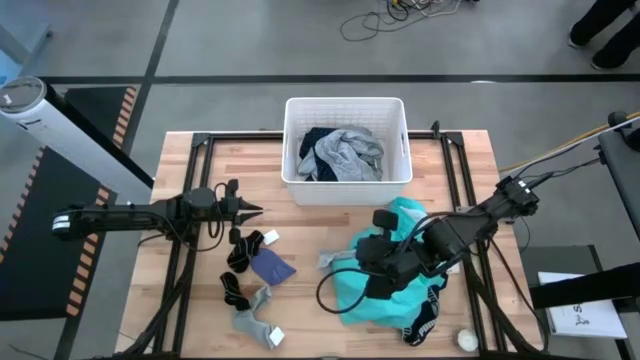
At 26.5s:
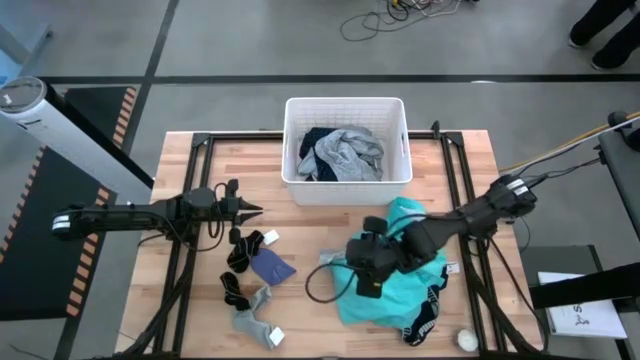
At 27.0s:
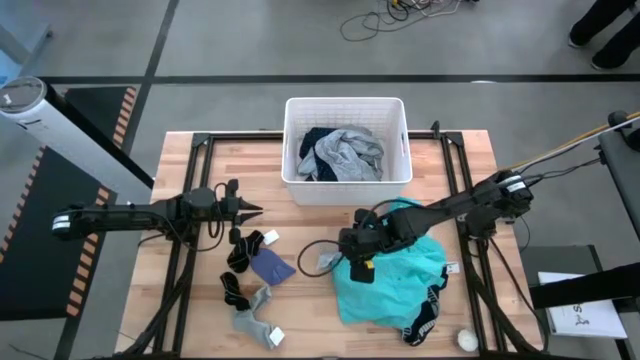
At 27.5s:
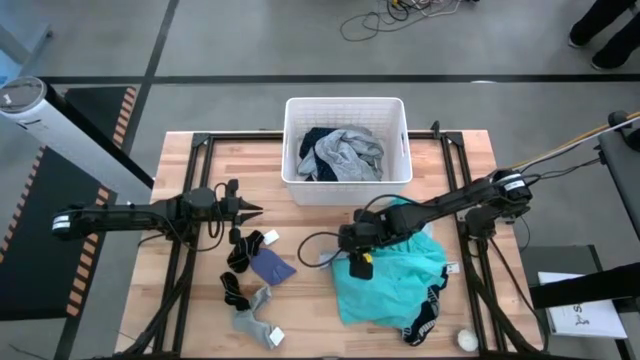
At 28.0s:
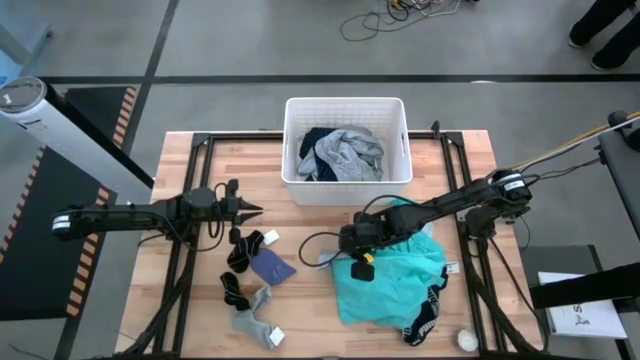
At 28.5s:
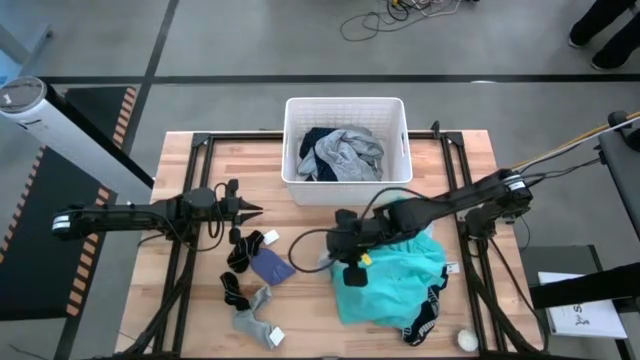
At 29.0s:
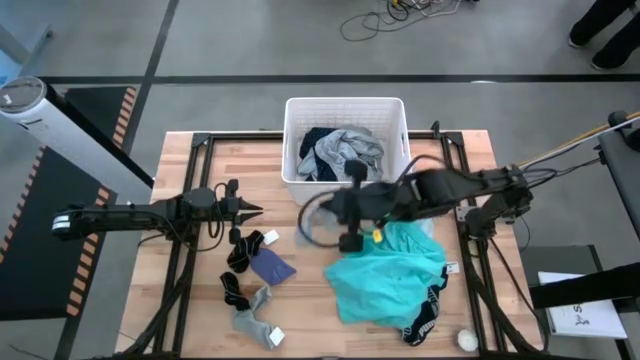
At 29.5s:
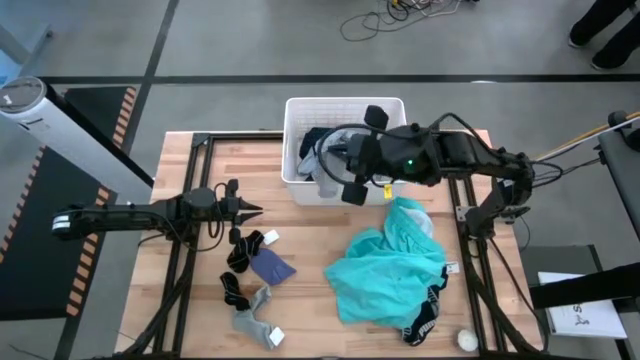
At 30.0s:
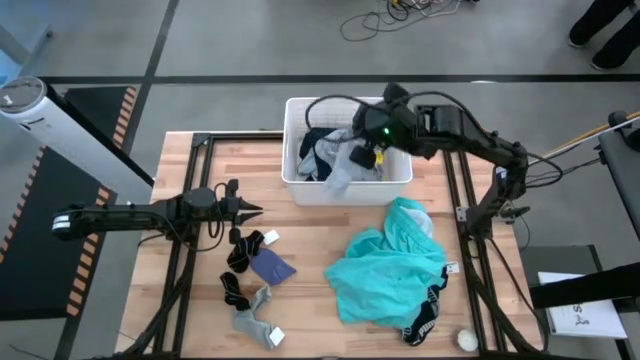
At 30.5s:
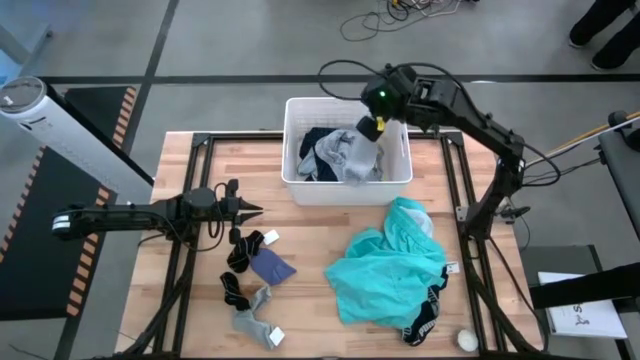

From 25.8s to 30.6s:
Task: Sort clothes
Put the right gray sock into the white laundry bin

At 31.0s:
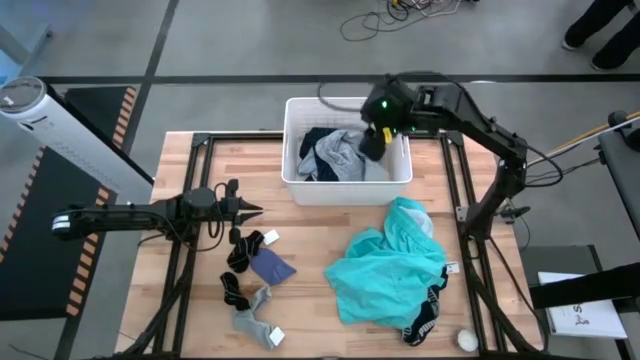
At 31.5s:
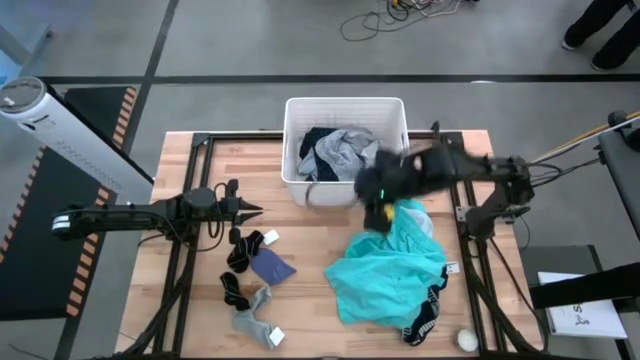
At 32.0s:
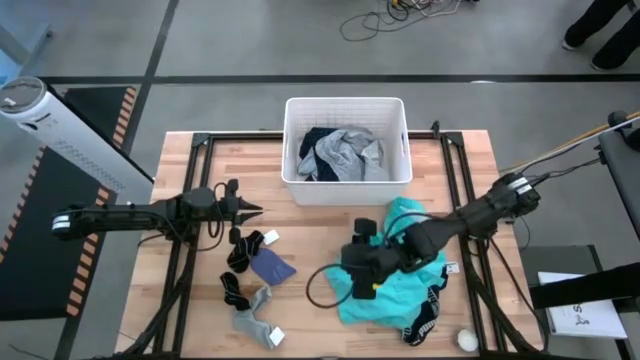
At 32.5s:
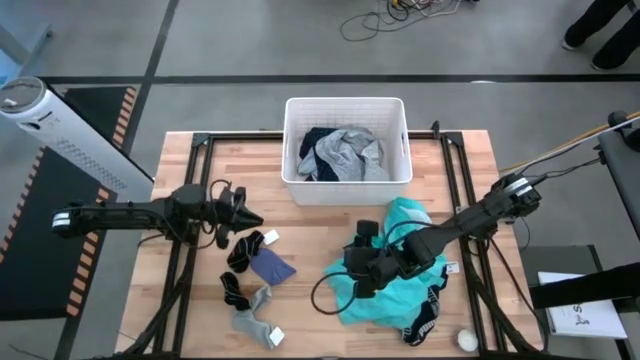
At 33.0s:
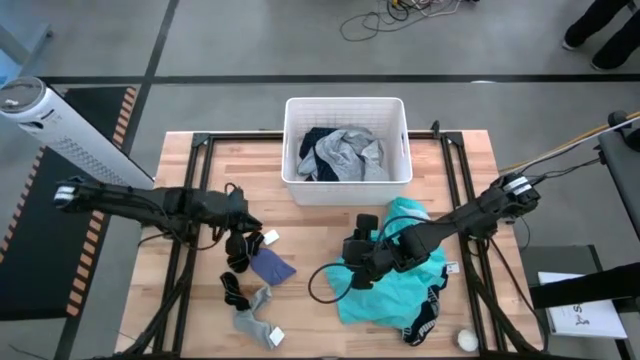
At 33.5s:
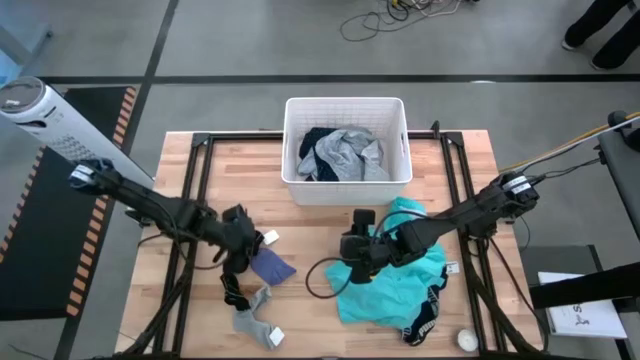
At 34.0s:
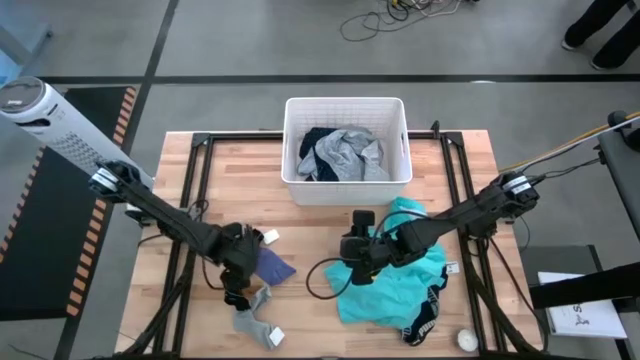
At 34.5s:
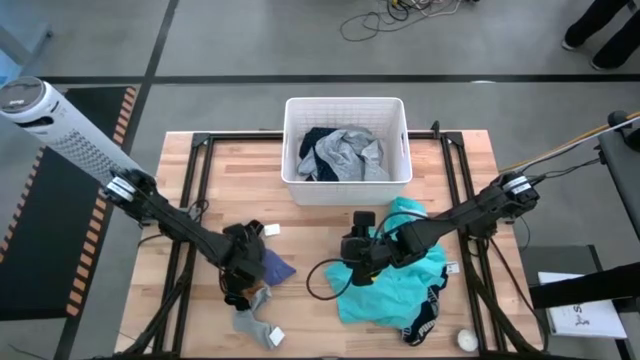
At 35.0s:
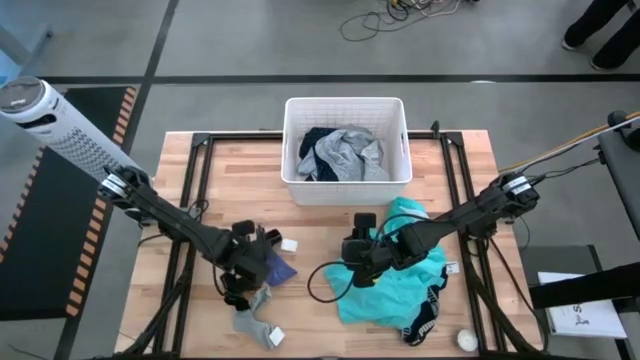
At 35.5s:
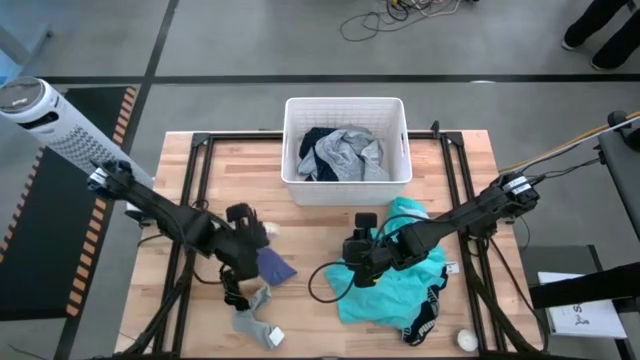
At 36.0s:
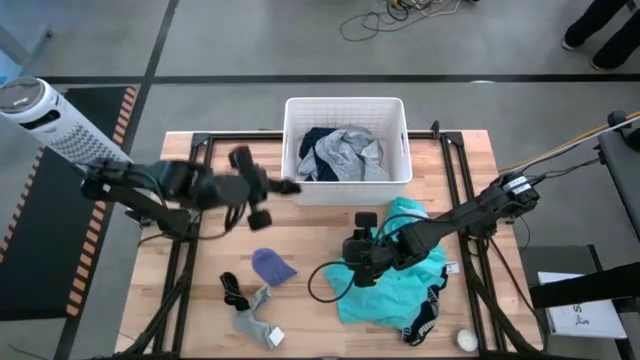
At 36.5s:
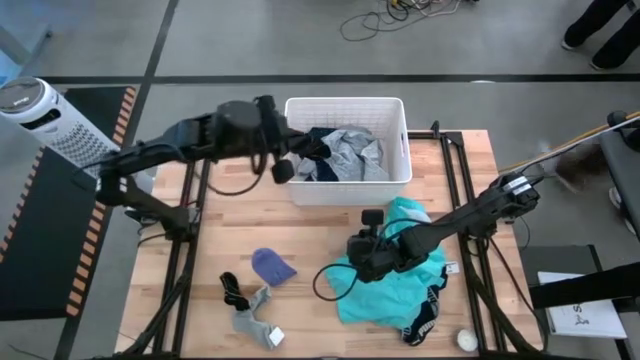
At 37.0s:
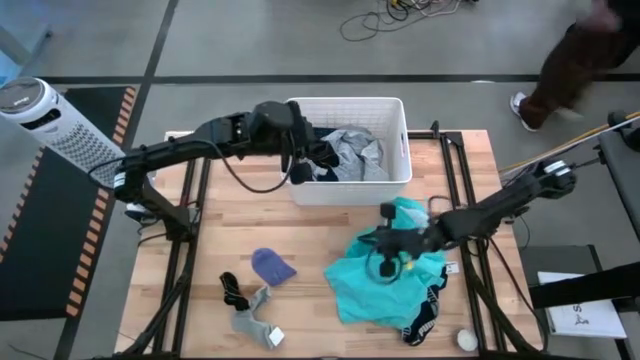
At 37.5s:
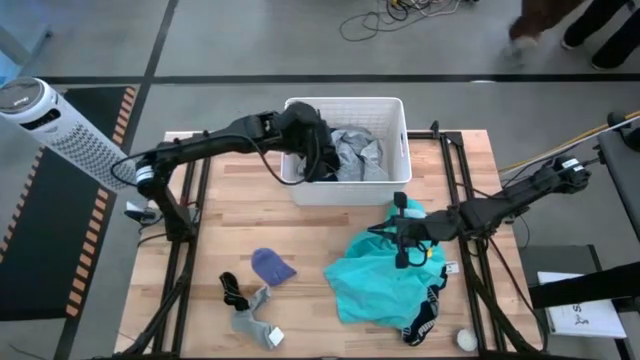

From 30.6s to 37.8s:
Put the top black sock into the white laundry bin

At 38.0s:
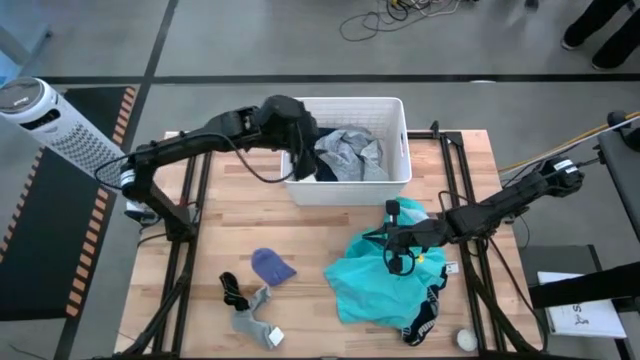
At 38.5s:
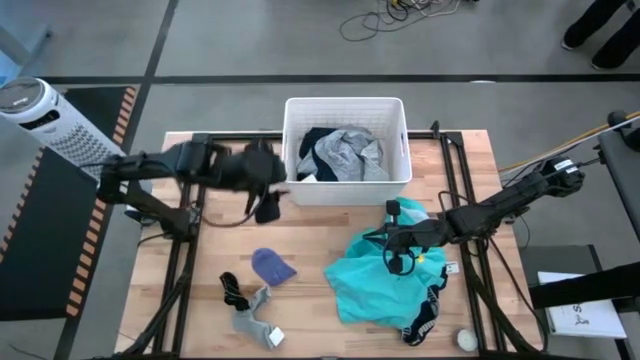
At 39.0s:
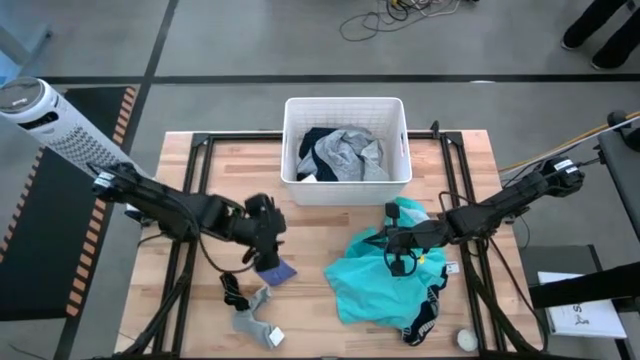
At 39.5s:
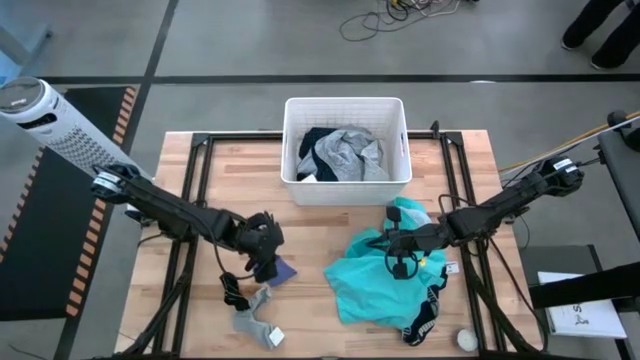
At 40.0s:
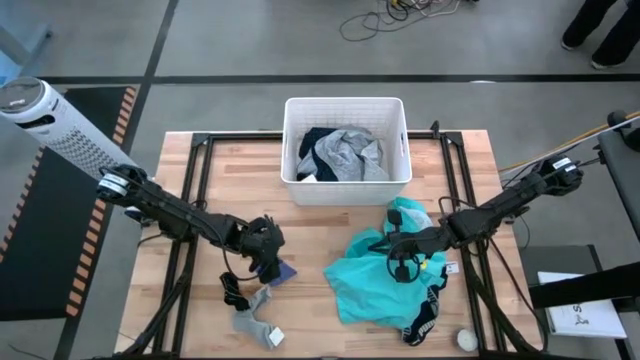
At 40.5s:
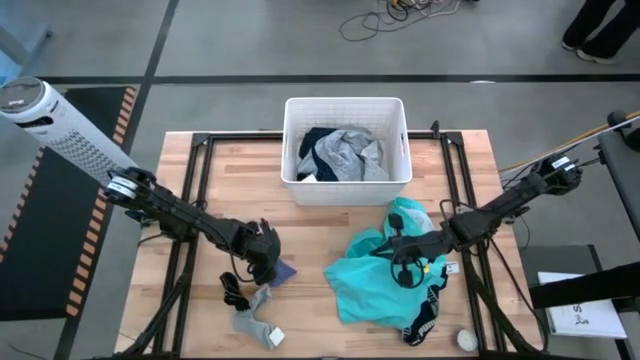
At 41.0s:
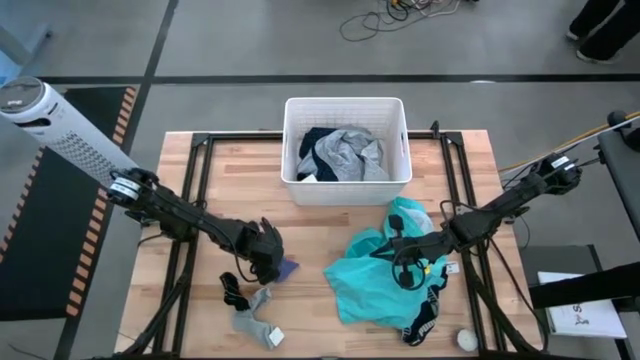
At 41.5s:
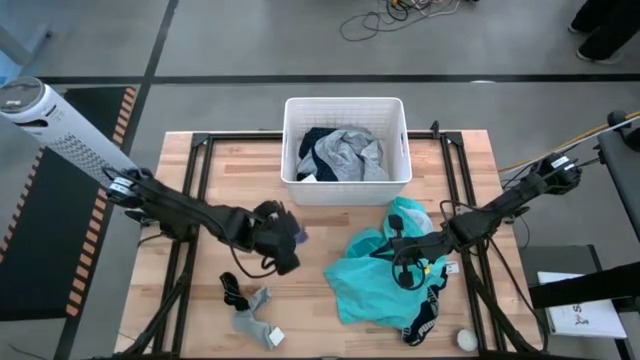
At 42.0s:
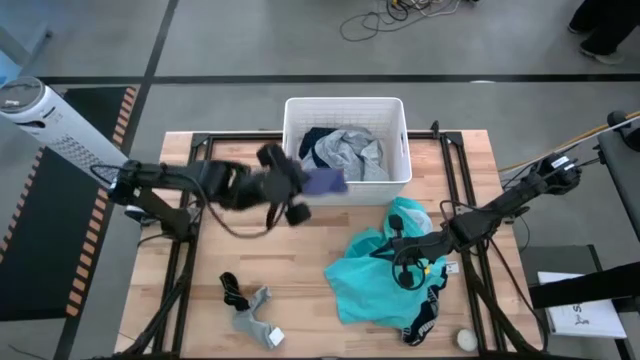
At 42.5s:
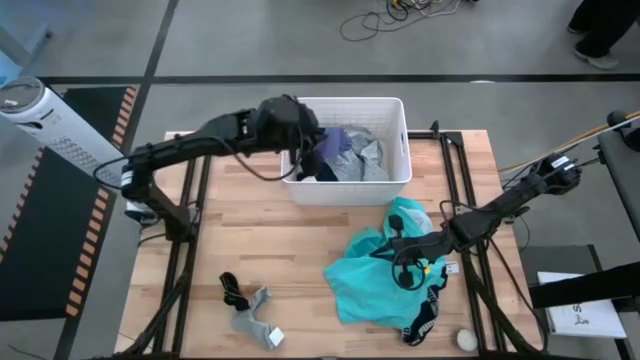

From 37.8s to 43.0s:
Put the blue sock into the white laundry bin

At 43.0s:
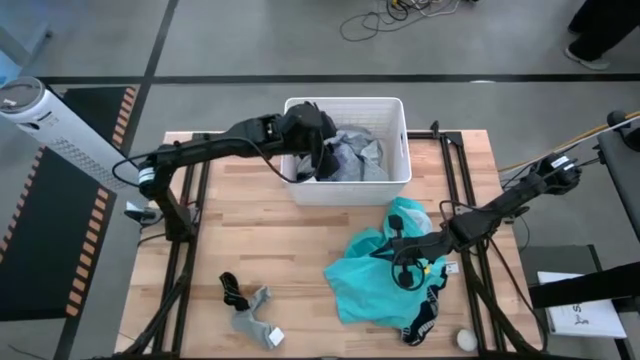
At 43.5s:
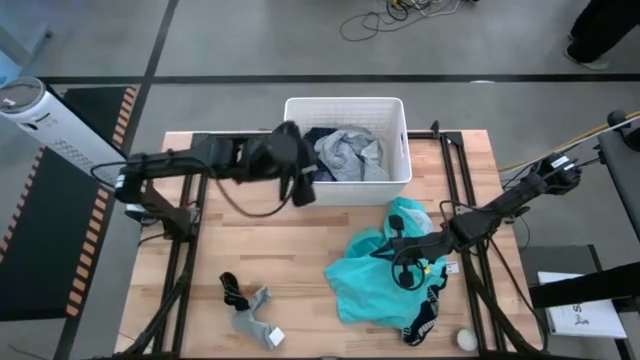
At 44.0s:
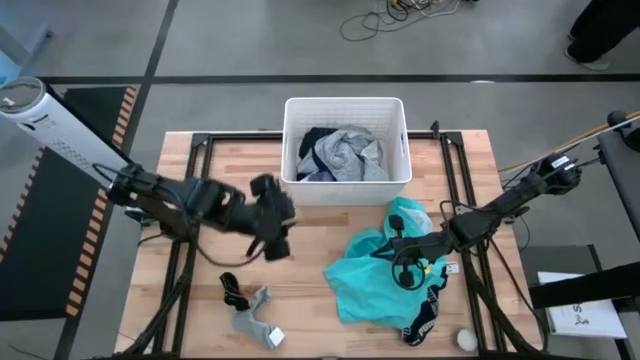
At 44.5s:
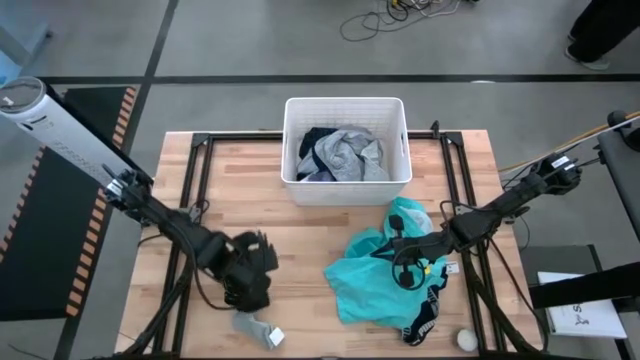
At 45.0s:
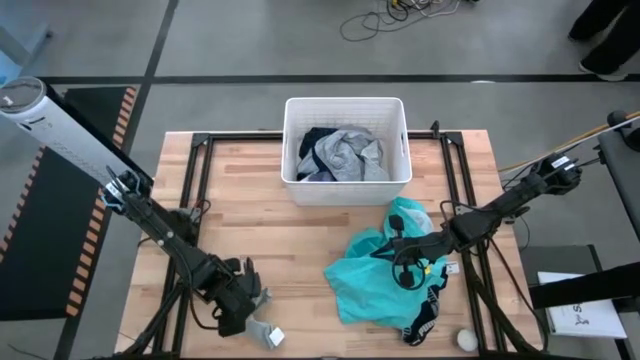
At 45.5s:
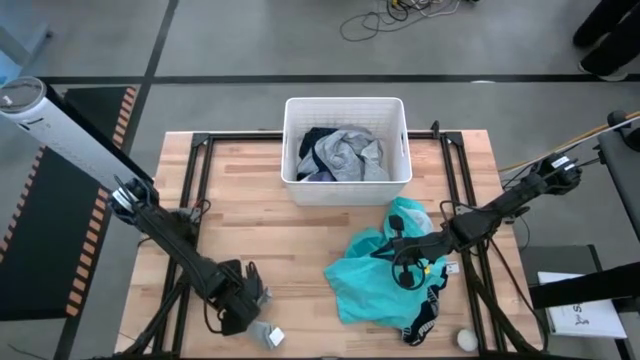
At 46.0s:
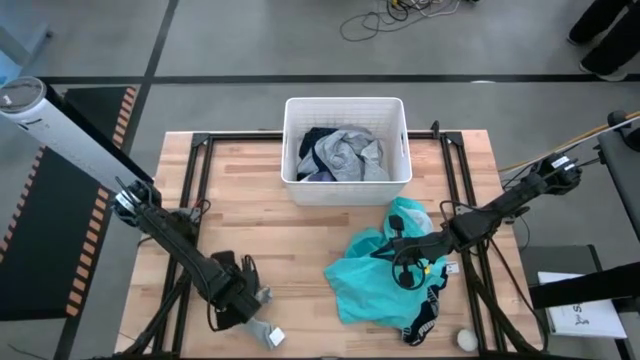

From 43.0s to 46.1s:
Put the black sock into the white laundry bin

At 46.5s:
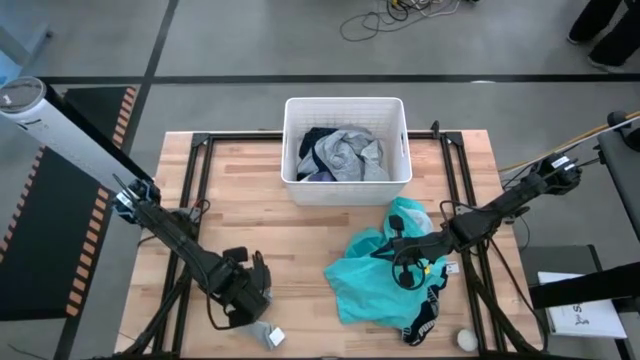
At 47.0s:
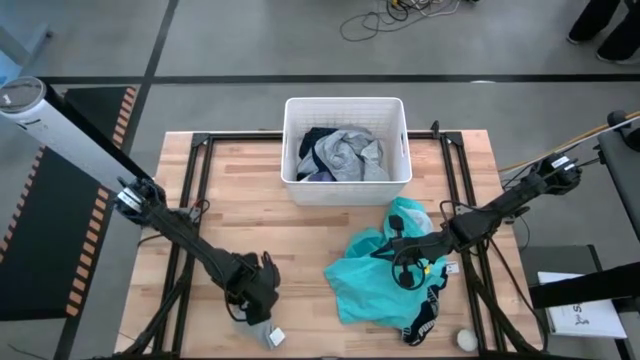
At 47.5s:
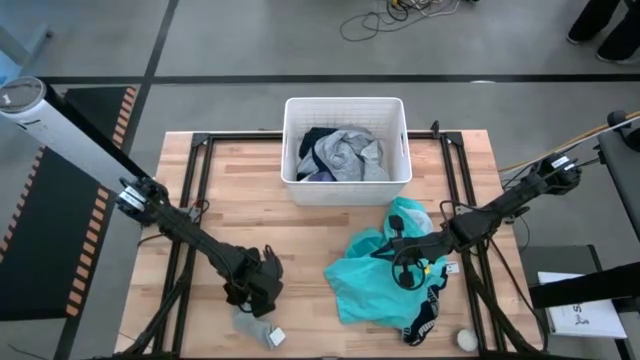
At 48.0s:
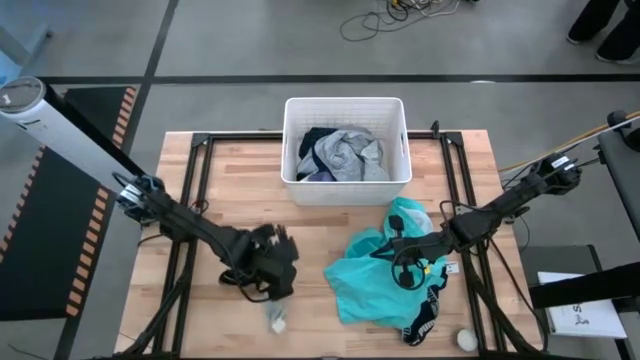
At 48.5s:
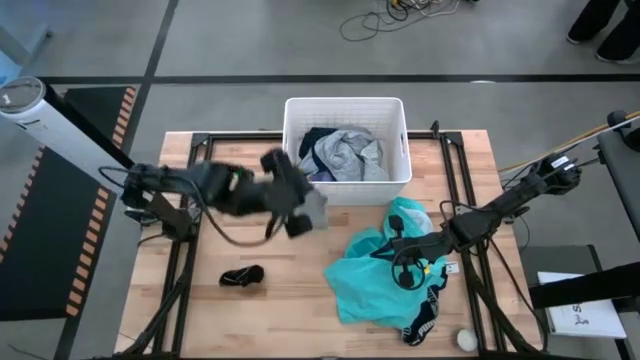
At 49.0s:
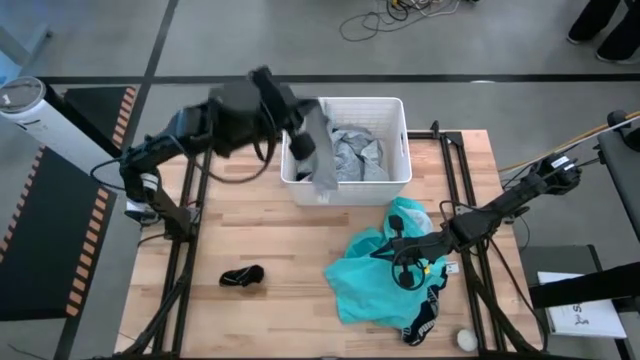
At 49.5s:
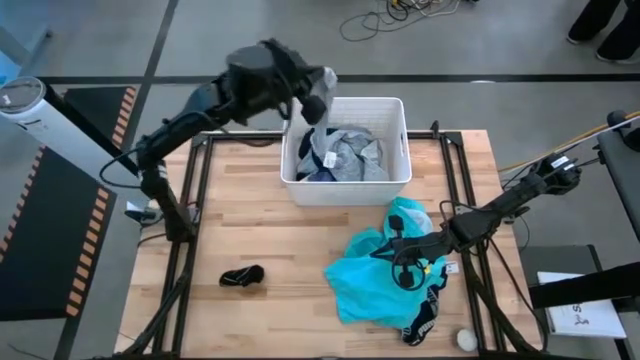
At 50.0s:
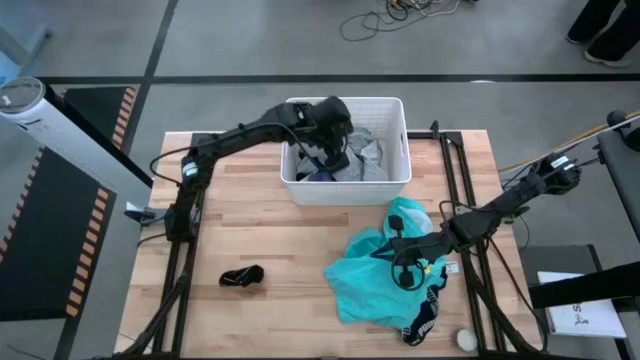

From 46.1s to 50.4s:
Put the gray sock into the white laundry bin
